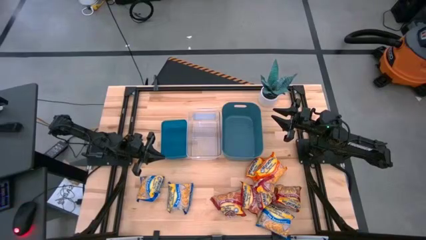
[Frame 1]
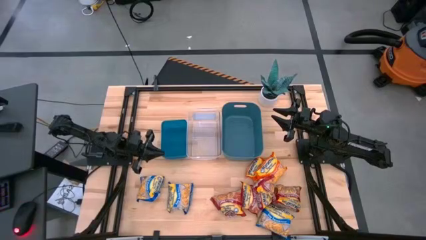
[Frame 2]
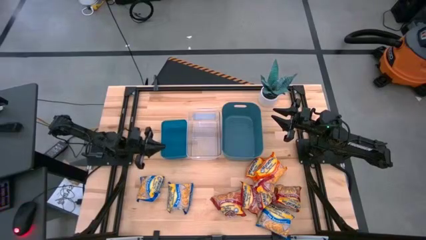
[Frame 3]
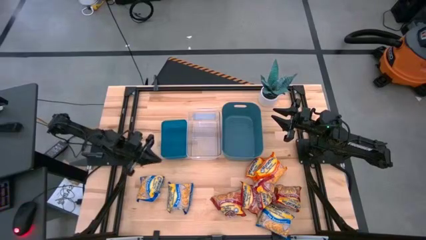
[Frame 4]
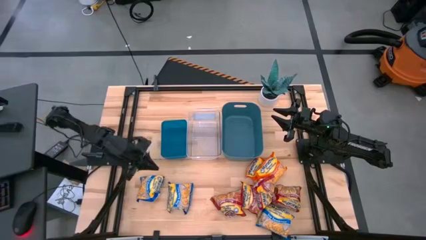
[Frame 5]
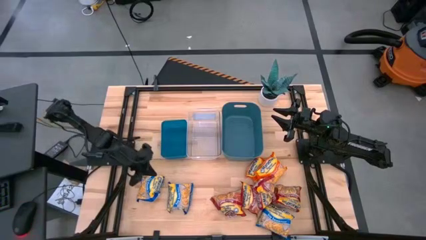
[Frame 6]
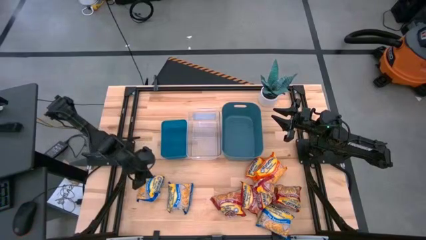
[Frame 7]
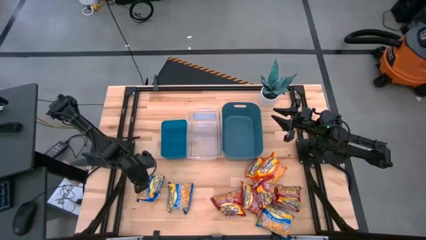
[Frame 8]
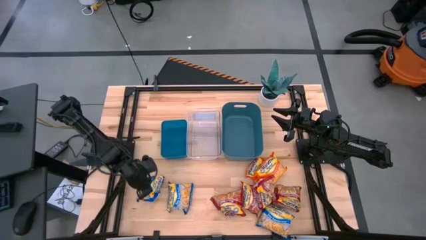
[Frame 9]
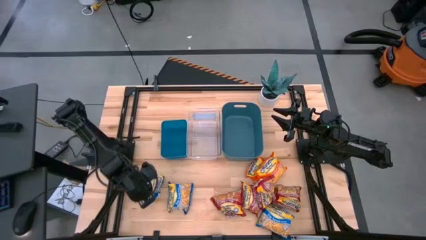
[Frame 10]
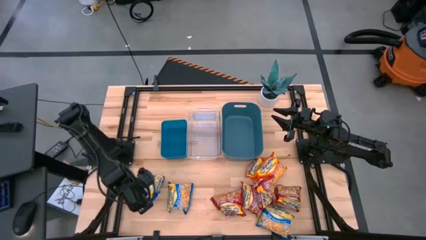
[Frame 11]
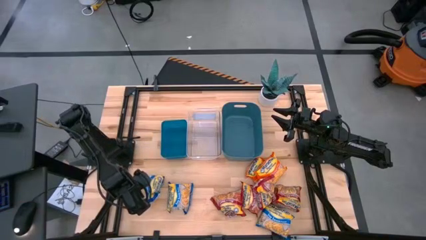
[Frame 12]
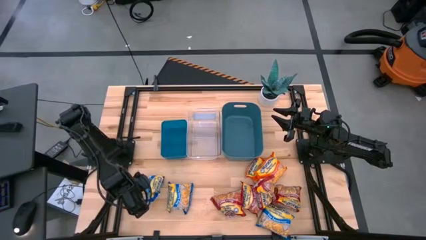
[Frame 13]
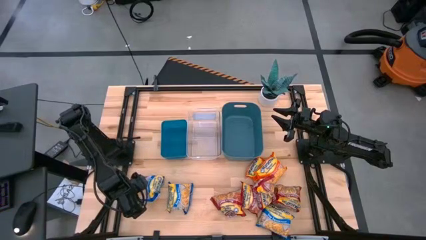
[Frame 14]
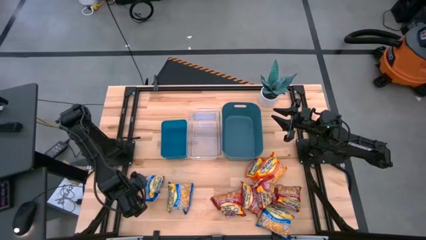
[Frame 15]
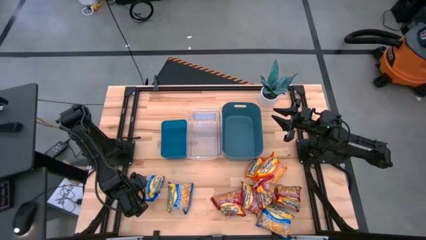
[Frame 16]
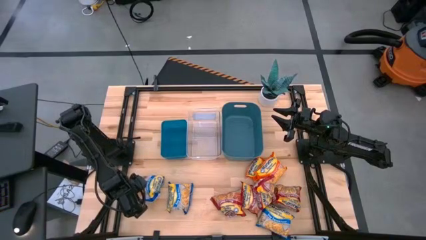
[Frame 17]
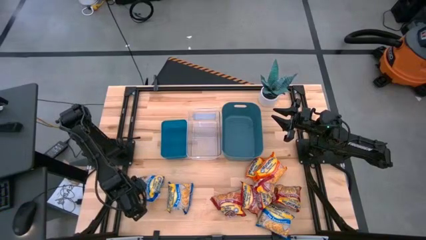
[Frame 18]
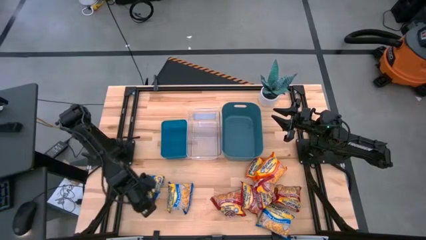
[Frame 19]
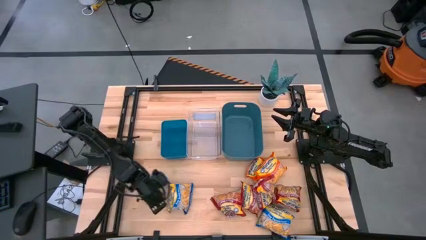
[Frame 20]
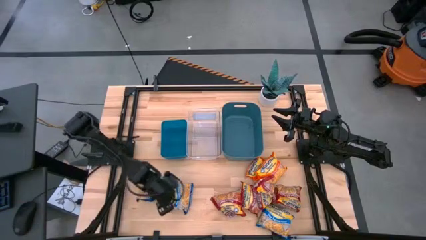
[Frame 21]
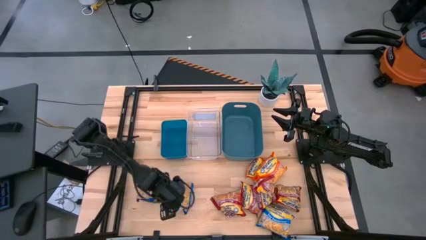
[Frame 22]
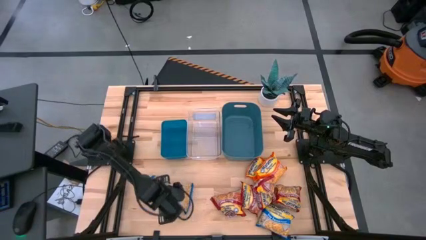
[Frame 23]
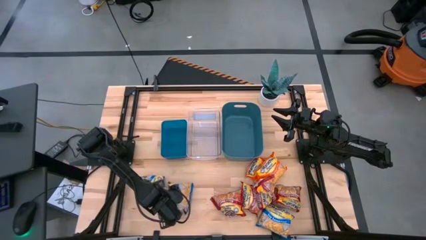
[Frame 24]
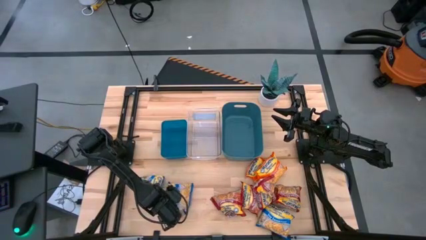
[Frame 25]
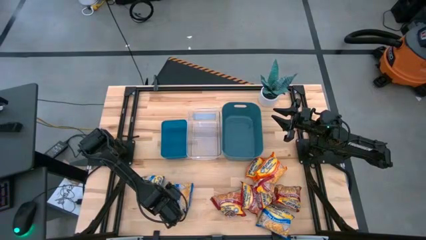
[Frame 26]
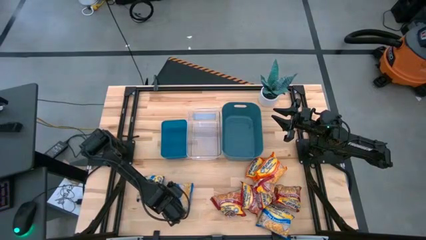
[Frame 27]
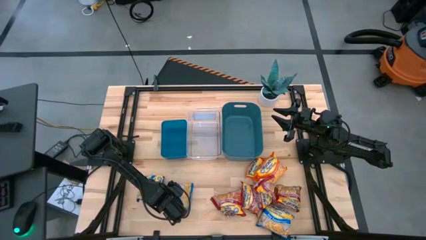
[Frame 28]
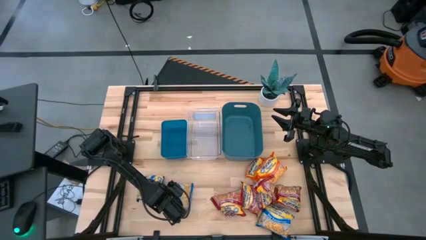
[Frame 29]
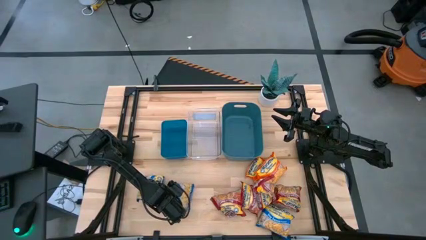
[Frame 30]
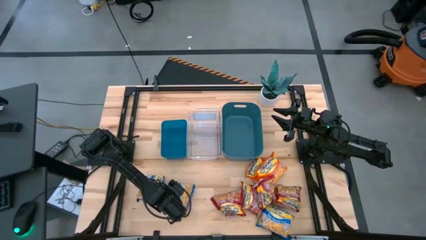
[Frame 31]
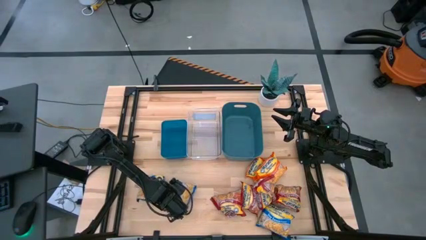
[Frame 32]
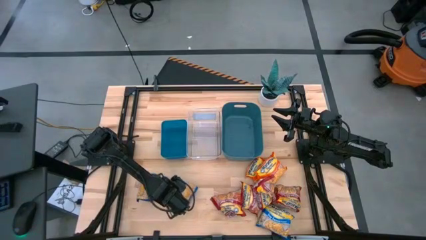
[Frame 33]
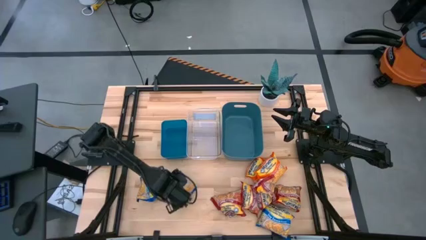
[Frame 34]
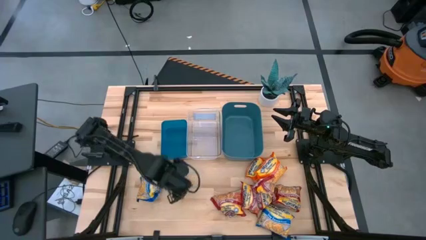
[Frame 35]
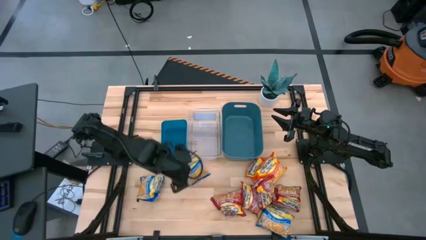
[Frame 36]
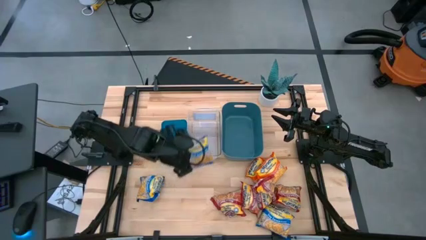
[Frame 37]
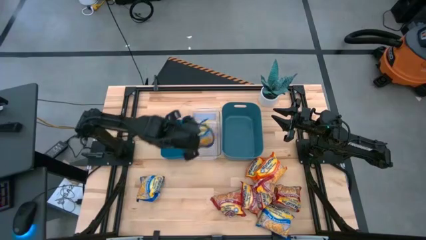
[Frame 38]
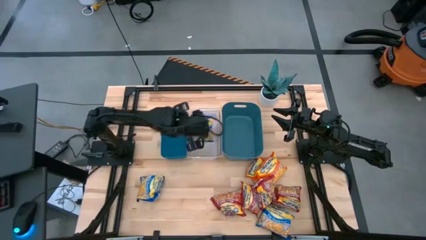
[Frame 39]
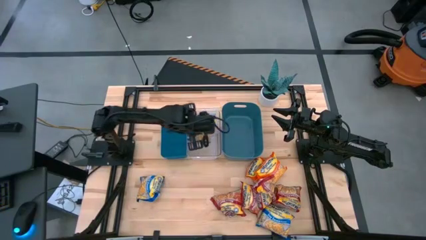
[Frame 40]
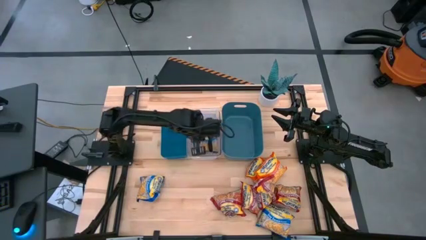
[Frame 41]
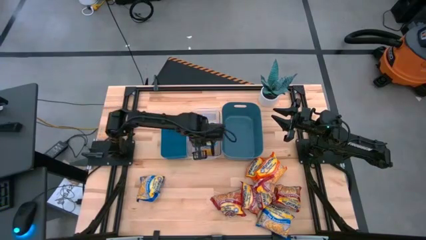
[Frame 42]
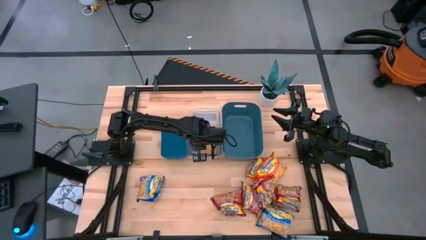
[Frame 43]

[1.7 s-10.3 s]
Task: Sort Maruchan noodles
Put the blue noodle pack into the transparent bin

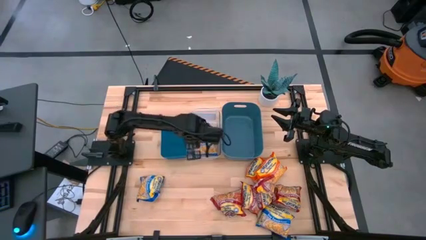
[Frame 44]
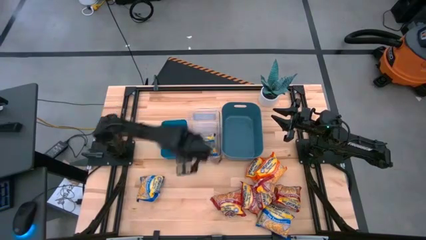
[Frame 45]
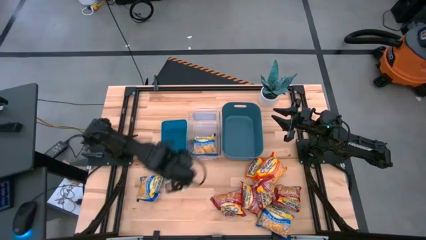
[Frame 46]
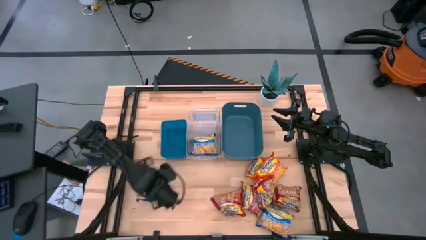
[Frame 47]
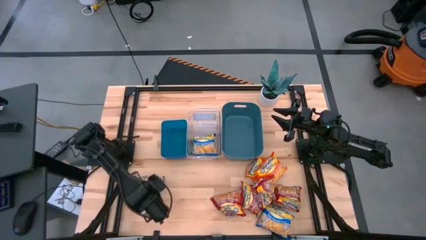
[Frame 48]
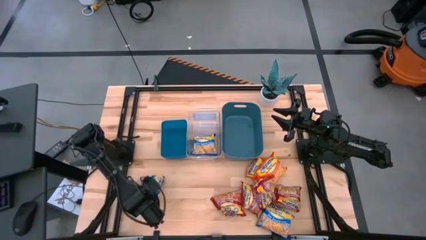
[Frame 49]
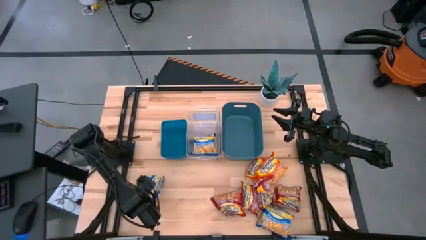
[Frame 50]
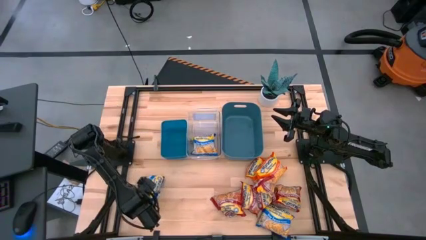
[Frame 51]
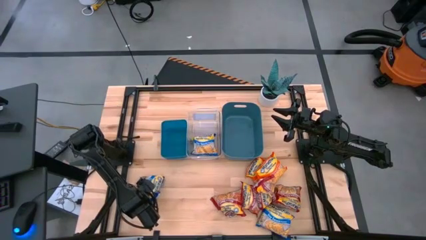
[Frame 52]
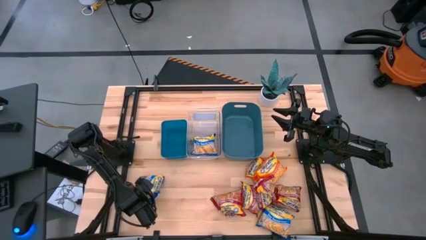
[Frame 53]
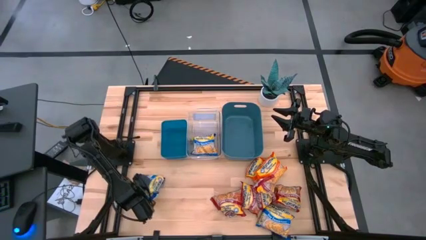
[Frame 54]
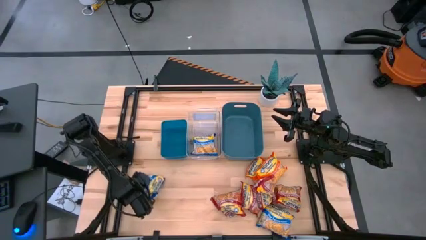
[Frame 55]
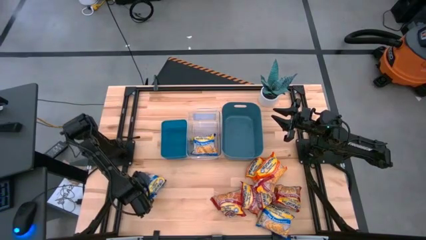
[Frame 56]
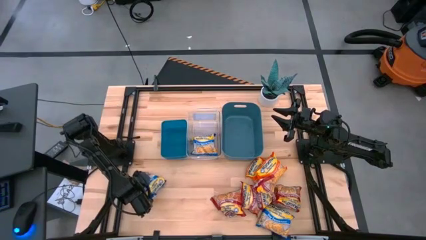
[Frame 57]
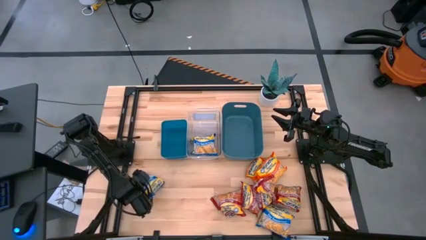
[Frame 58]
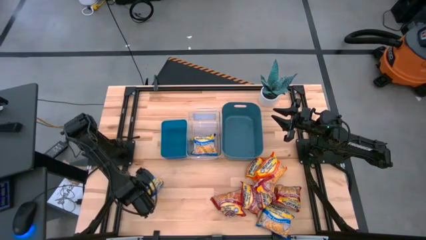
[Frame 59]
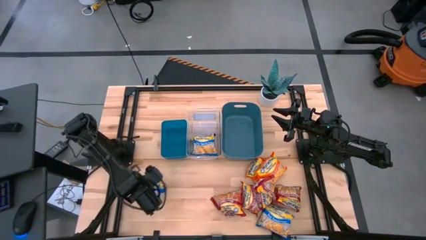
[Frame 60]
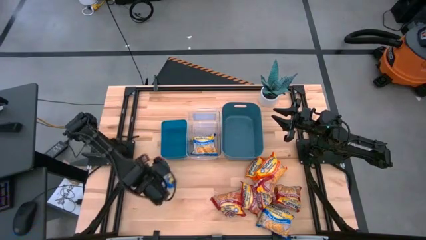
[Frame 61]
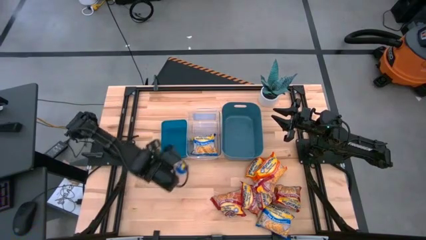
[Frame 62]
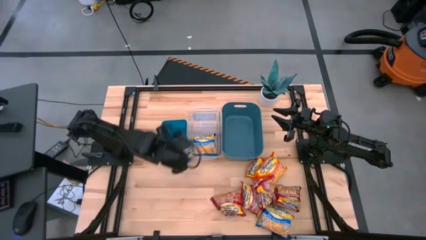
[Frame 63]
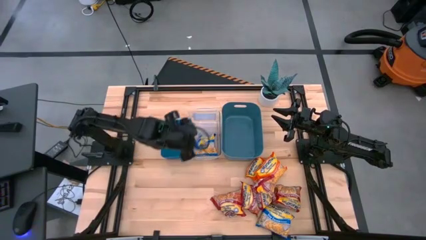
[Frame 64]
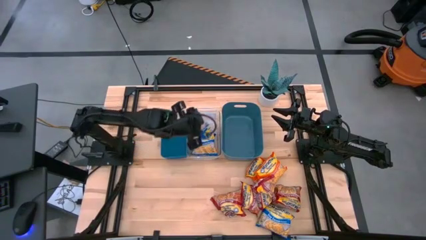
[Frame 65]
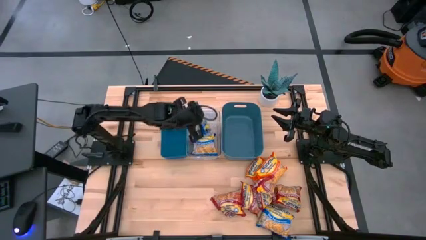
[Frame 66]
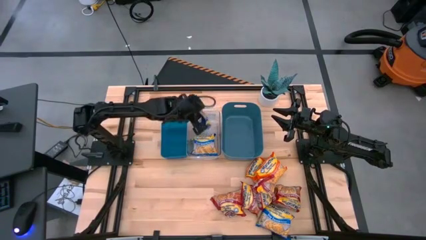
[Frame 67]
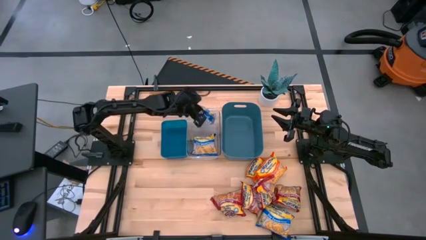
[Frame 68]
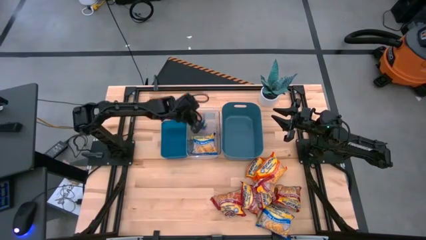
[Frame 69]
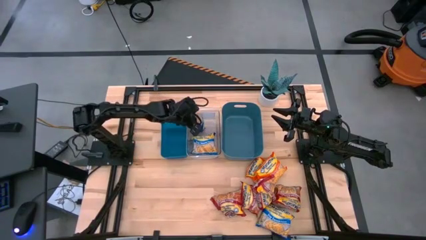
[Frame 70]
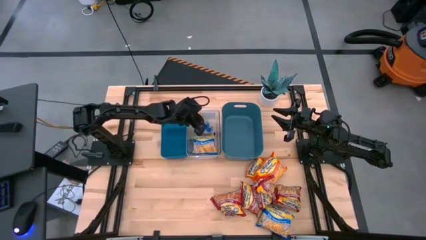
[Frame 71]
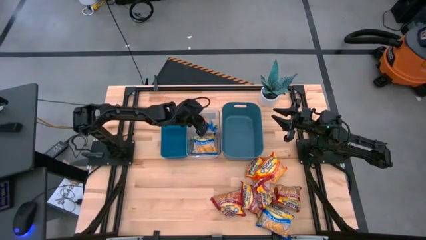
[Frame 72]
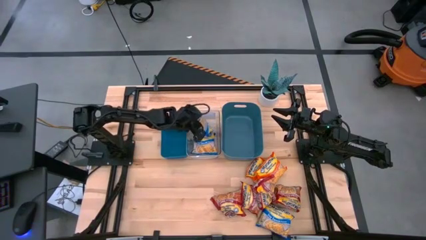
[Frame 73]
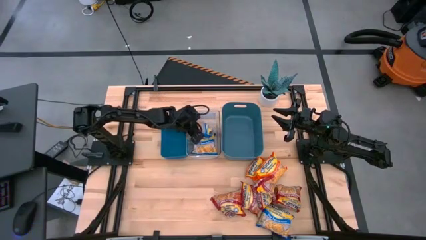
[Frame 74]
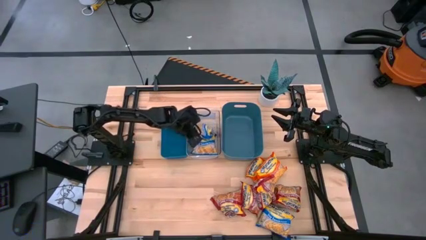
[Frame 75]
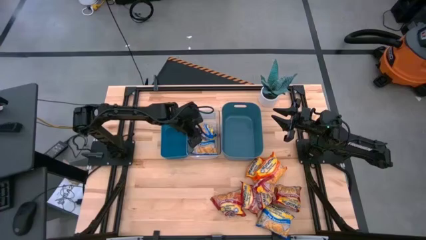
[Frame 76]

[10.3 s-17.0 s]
Put the blue noodle pack into the transparent bin

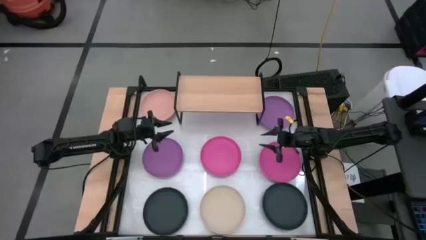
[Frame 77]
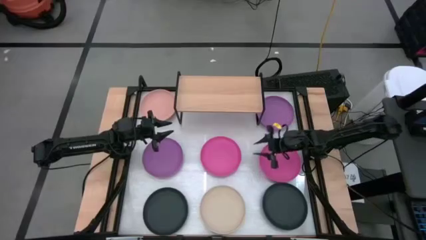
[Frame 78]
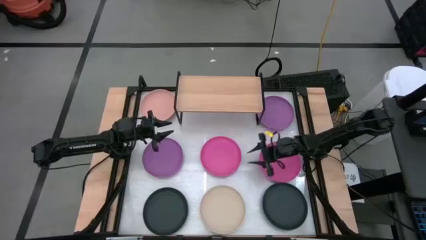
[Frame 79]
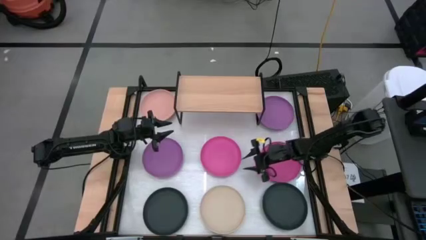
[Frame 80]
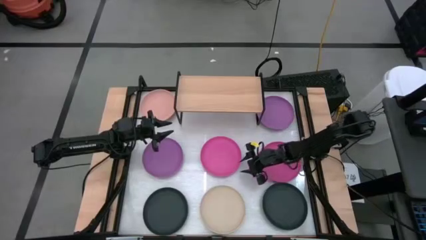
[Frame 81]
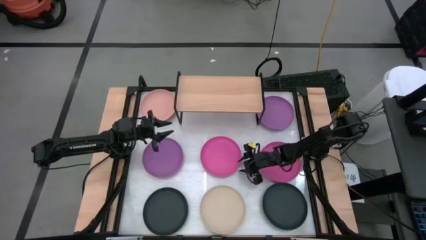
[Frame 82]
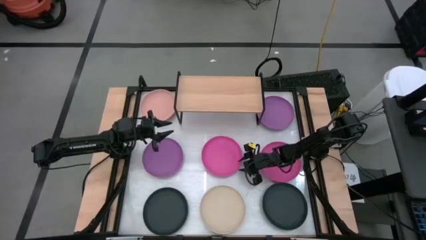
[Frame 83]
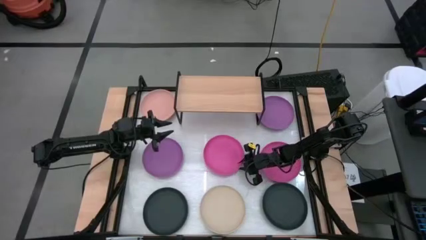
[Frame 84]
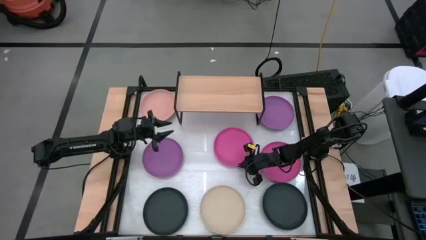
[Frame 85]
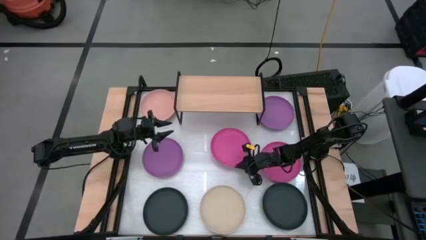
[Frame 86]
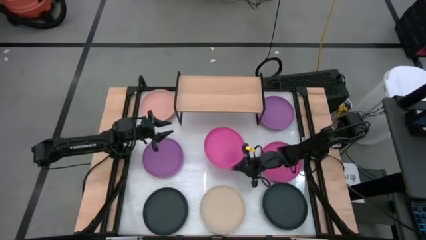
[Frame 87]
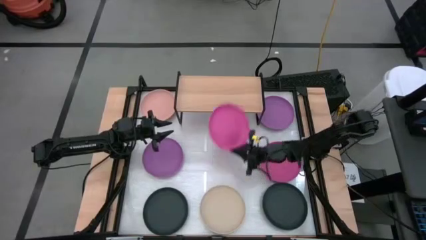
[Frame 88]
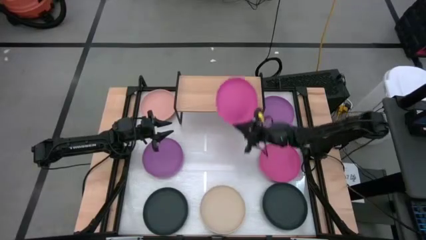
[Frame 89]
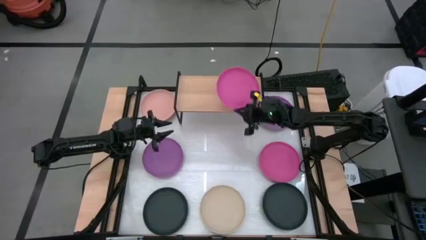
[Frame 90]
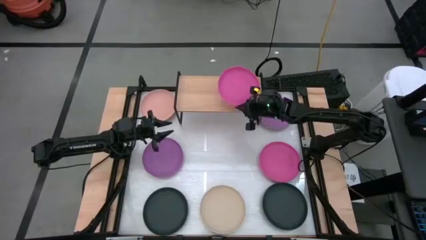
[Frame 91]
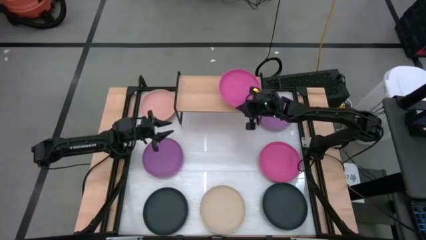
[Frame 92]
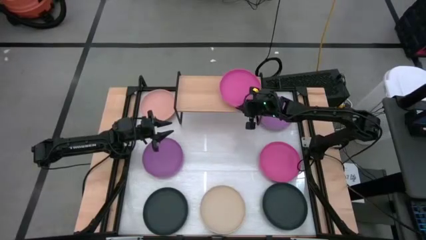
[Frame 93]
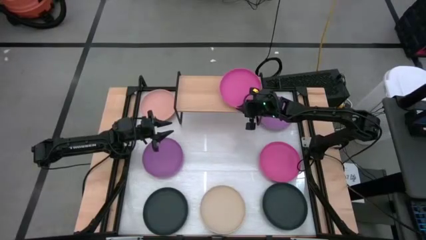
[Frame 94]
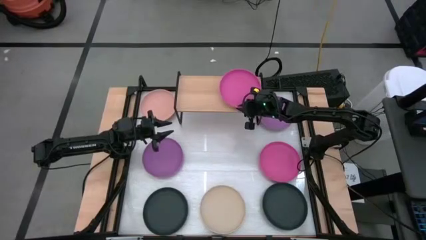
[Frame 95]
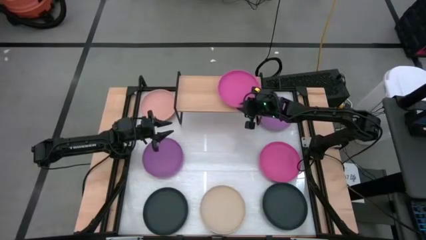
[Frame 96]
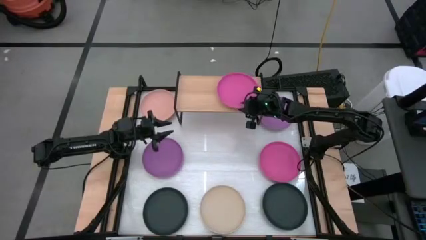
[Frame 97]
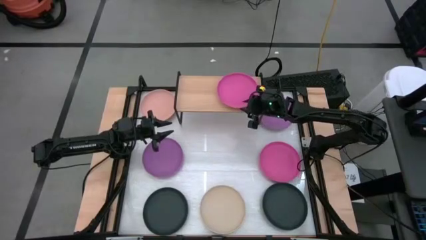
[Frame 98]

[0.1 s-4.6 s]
Task: Place and stack plates onto a shelf
Put the left pink plate on the shelf
